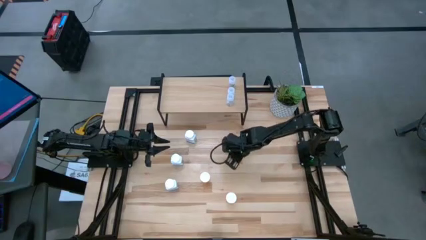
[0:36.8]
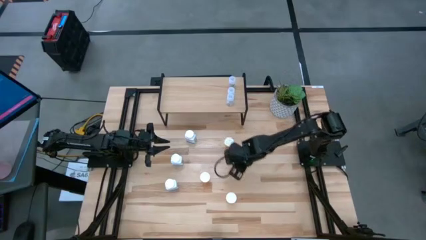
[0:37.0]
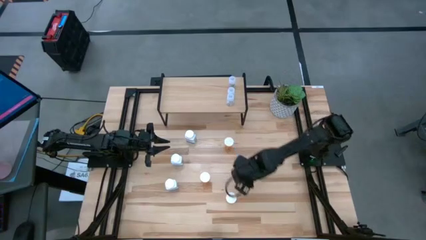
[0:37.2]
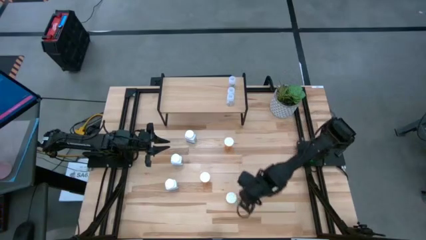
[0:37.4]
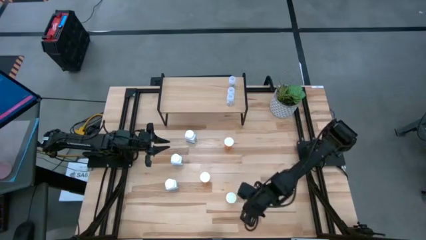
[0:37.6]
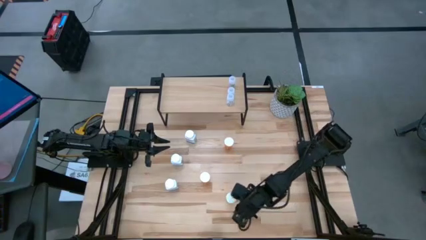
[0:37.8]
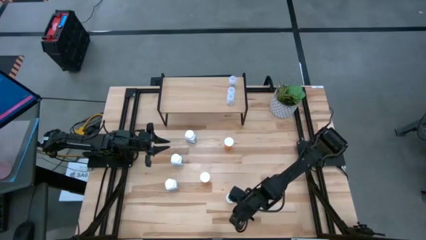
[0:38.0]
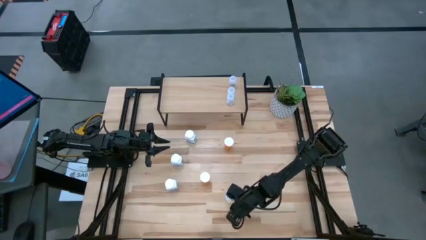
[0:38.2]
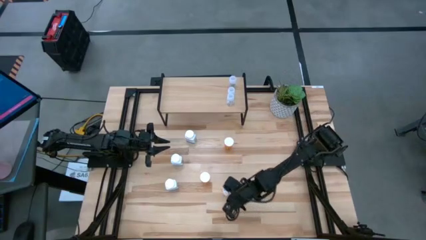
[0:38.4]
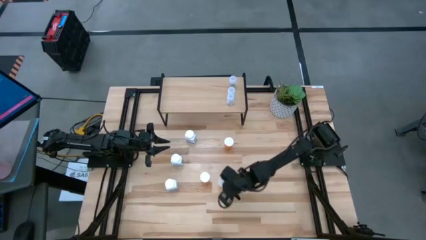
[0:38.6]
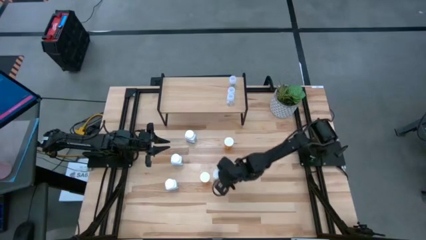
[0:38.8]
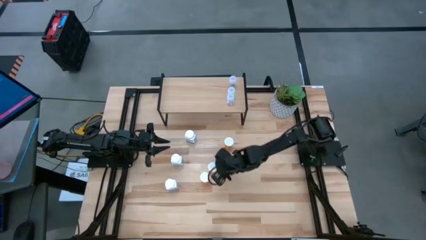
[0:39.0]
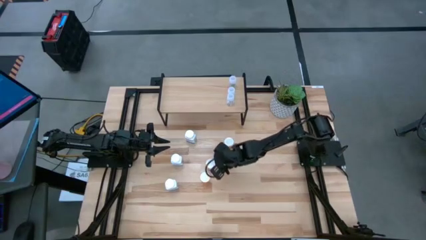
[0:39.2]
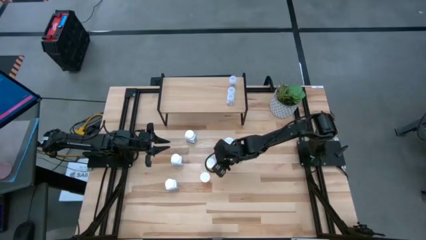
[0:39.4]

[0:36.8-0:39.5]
Task: Pick and place medicine bottles onto shelf by color
Adjust the bottom orange pill bottle

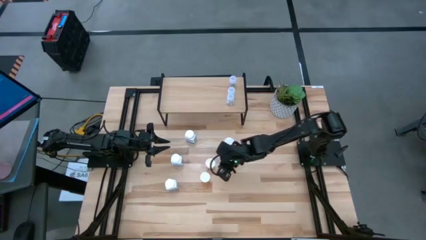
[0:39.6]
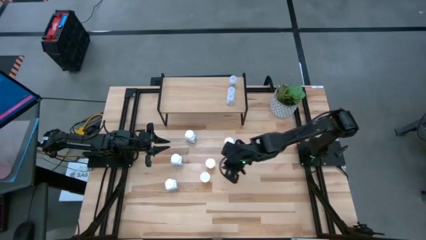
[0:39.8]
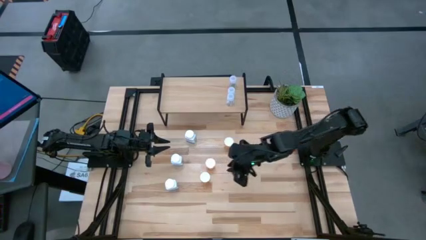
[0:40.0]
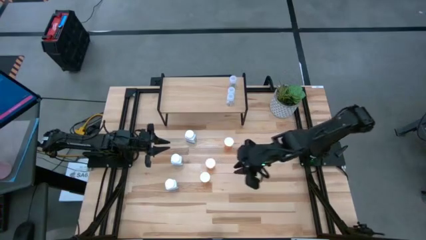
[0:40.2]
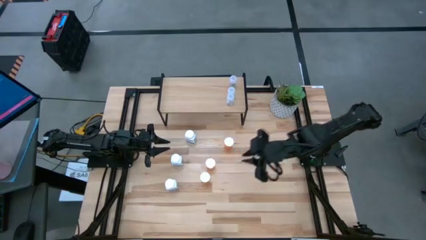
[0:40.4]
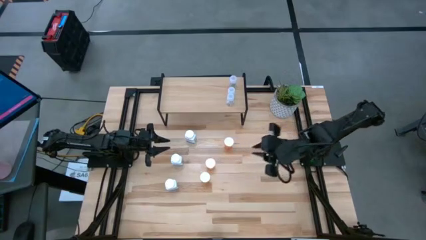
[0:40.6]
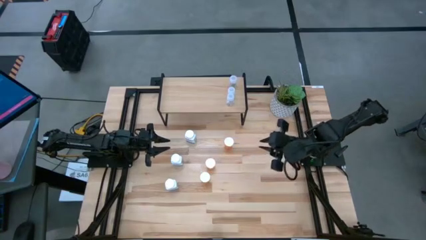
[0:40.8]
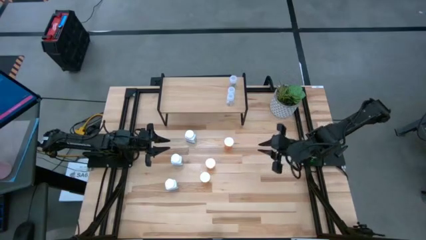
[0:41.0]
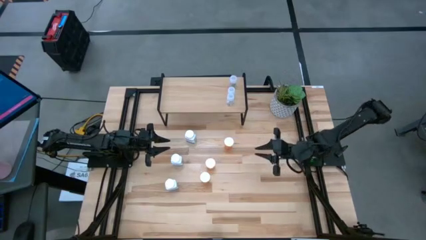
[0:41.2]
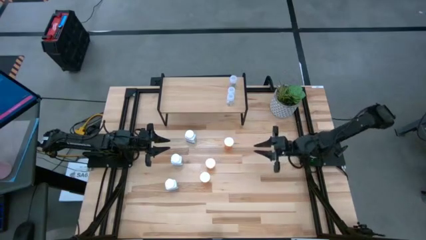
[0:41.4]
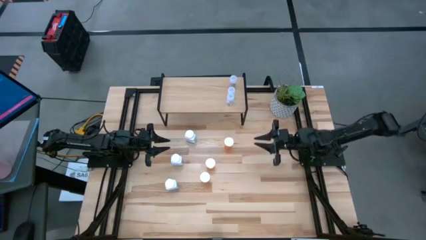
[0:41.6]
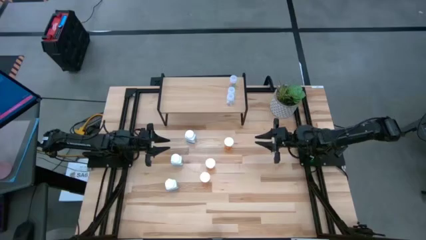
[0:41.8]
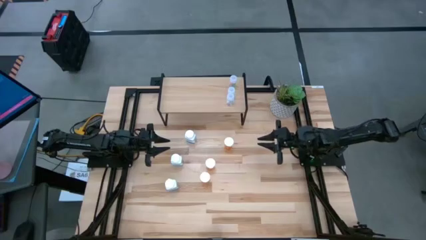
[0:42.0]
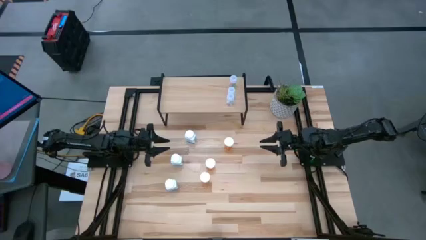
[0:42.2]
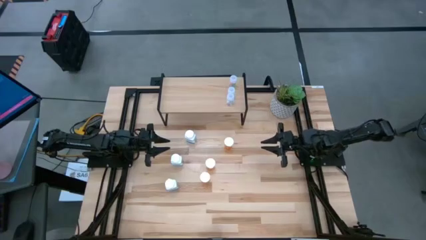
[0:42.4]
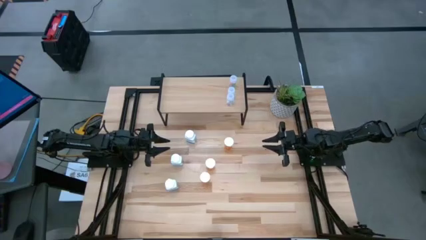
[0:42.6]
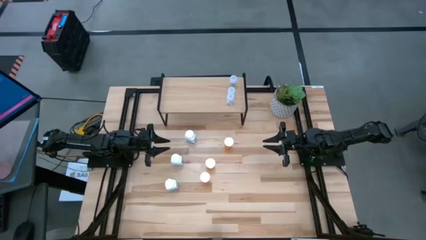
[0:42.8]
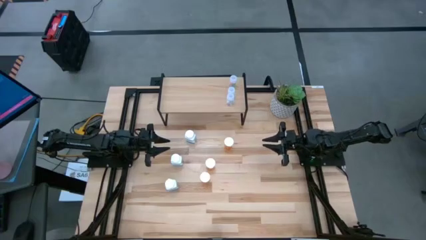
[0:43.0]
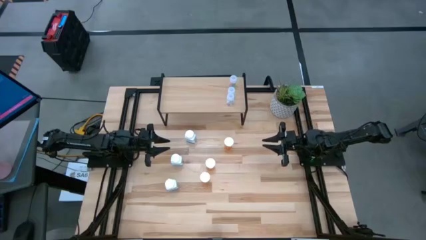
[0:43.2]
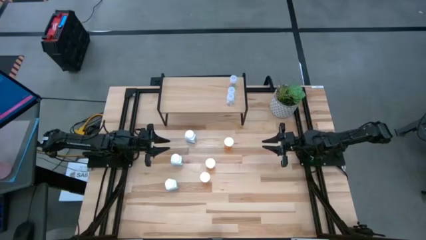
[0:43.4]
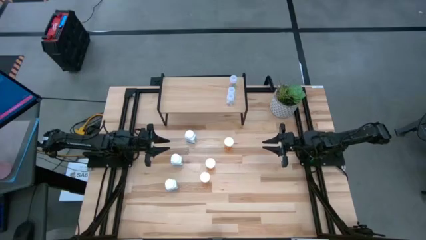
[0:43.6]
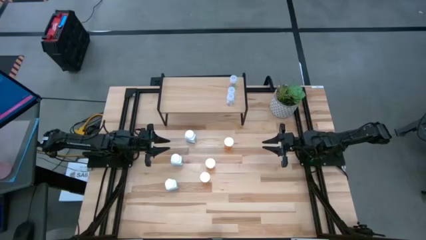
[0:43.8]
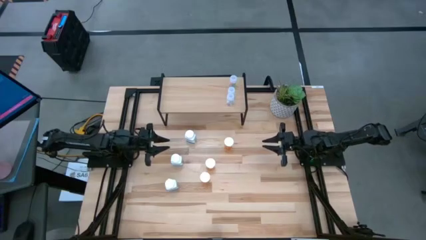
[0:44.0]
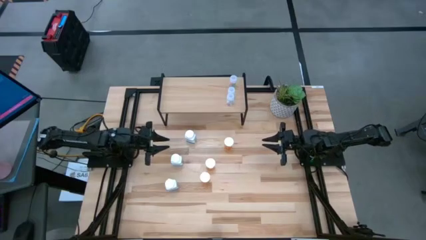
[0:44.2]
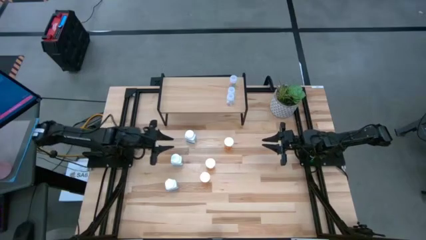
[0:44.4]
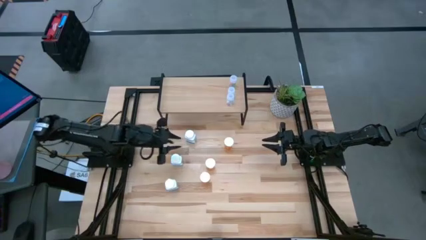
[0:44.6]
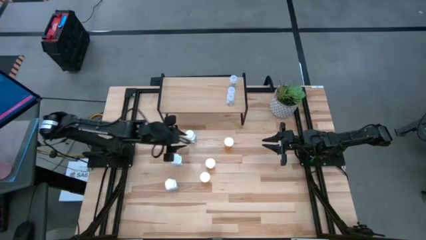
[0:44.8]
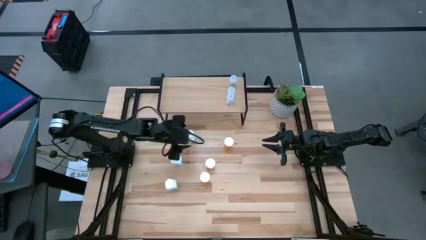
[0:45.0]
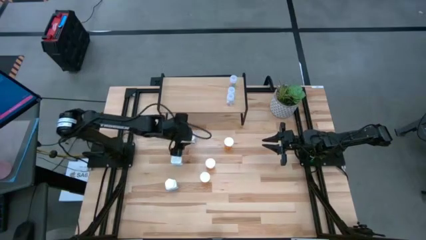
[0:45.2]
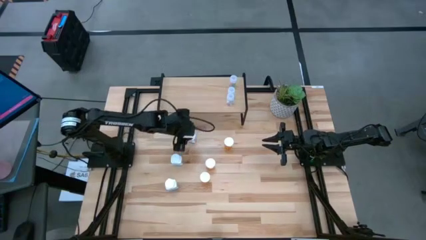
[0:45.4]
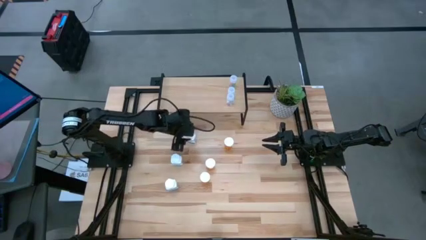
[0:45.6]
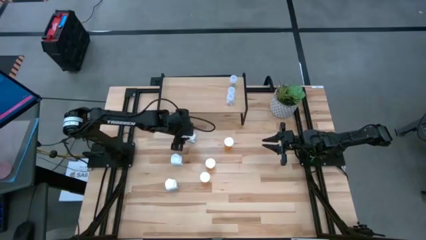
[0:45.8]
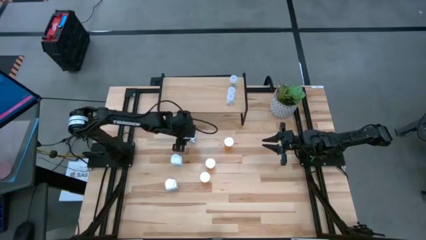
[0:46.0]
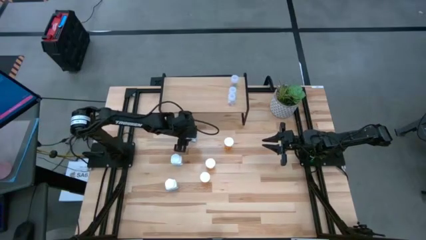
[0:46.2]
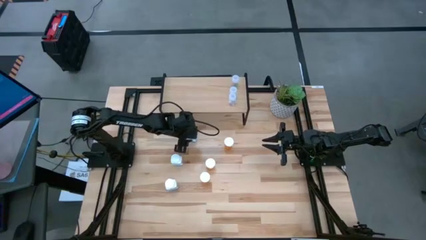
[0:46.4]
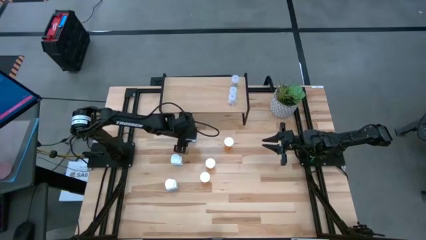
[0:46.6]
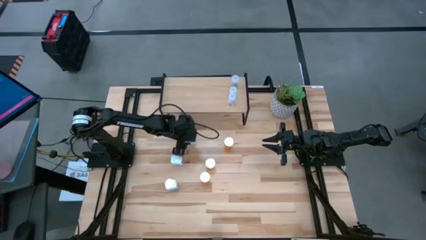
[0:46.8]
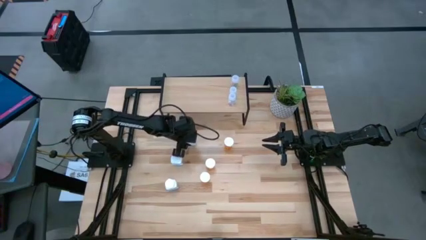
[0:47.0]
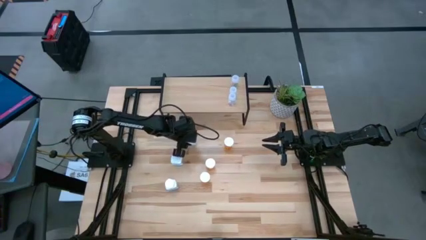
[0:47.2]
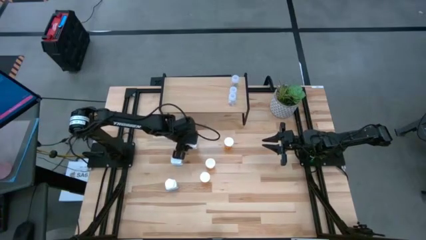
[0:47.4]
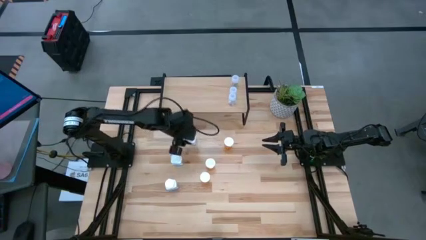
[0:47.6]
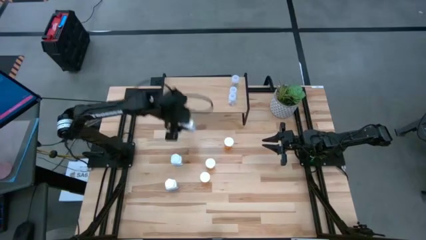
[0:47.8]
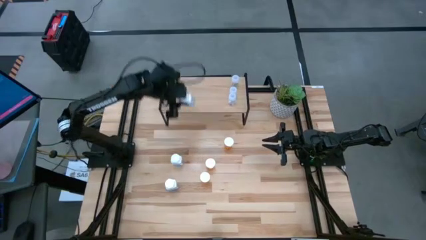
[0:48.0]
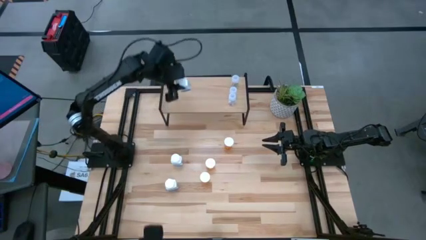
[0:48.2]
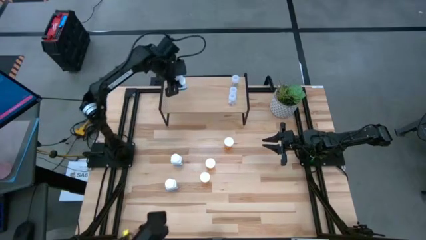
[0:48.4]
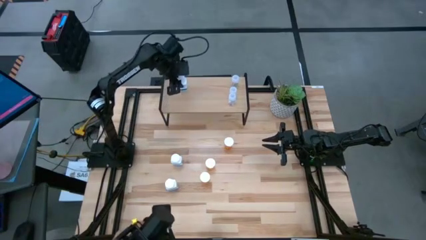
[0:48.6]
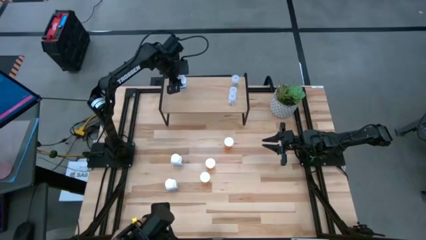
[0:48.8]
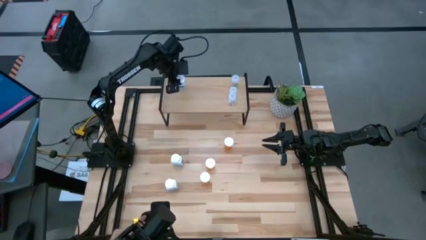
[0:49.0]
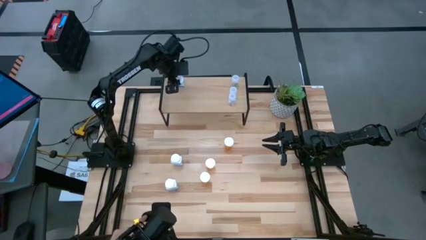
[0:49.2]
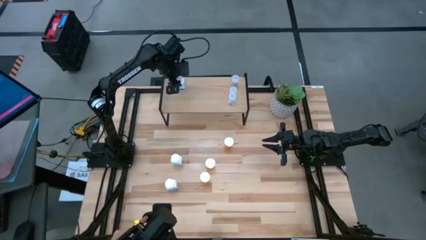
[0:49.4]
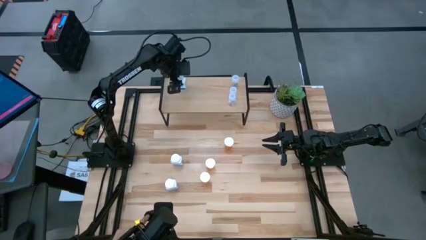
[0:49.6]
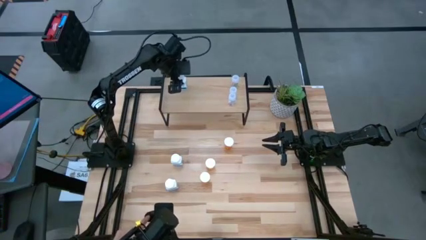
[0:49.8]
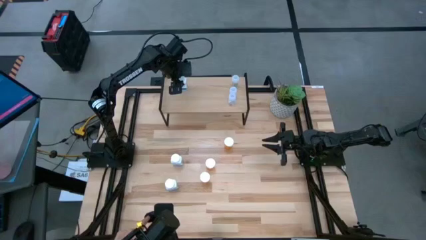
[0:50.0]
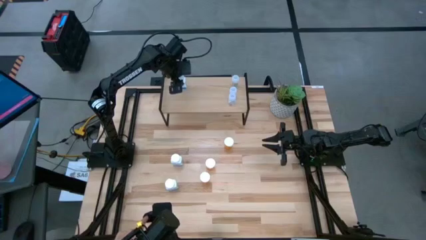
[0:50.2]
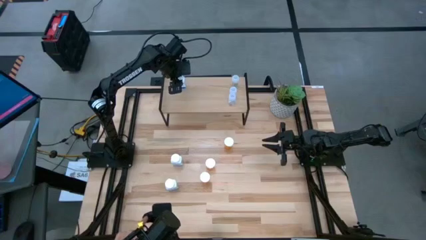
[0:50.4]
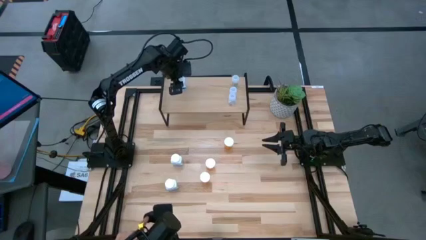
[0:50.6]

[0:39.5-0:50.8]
Put the top white pill bottle on the shelf

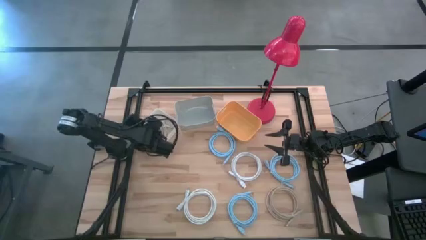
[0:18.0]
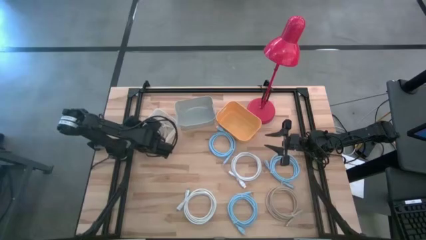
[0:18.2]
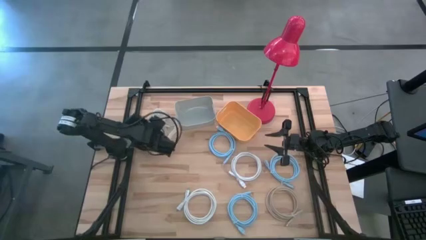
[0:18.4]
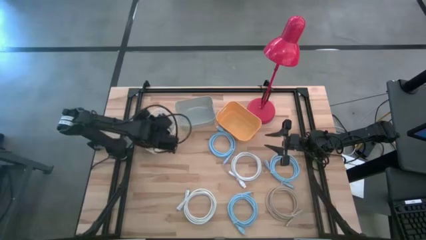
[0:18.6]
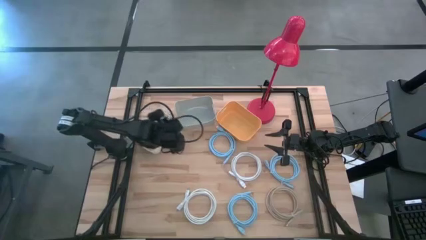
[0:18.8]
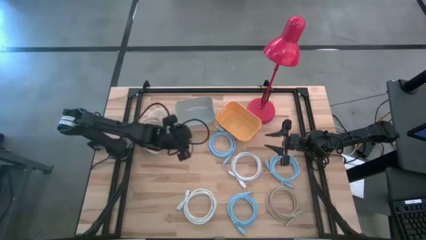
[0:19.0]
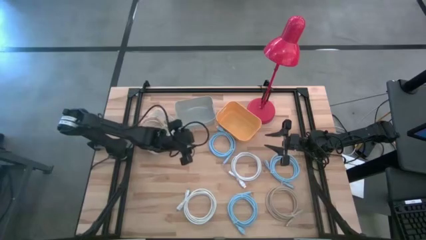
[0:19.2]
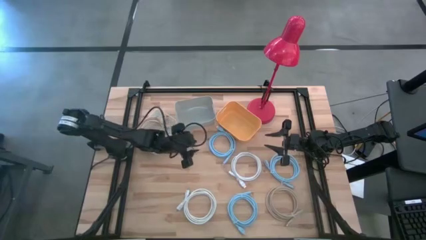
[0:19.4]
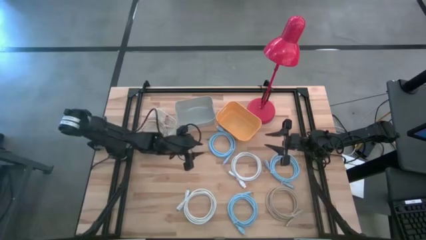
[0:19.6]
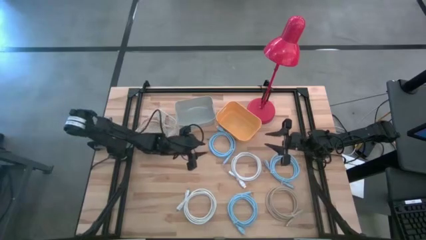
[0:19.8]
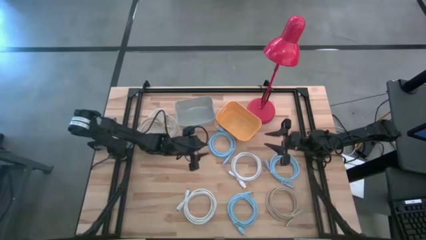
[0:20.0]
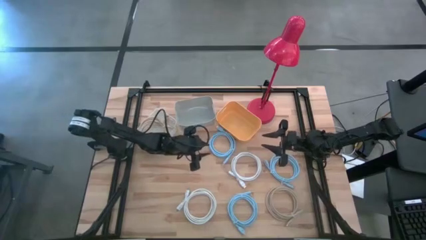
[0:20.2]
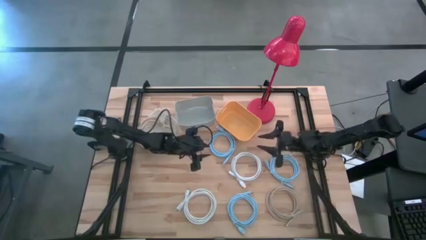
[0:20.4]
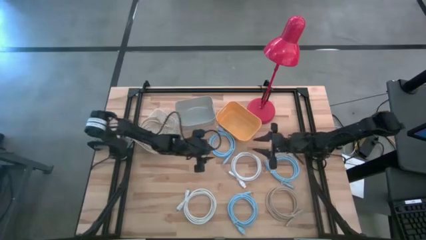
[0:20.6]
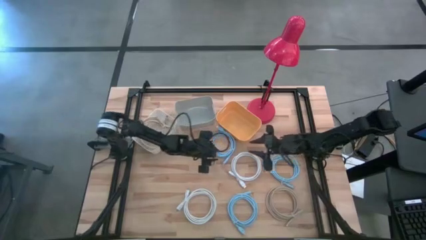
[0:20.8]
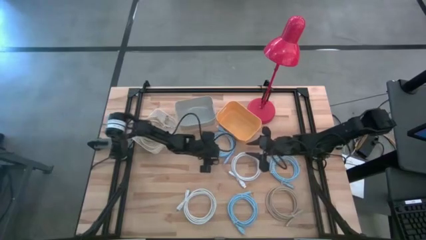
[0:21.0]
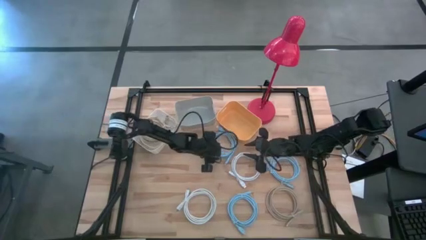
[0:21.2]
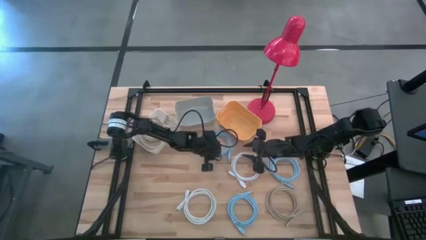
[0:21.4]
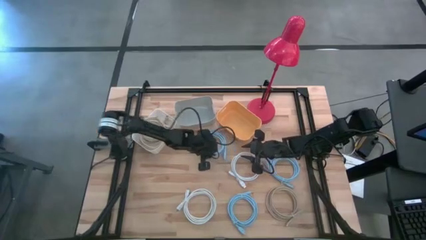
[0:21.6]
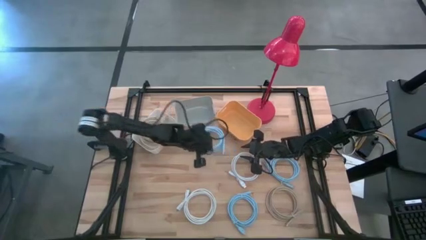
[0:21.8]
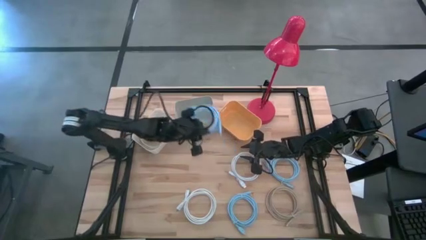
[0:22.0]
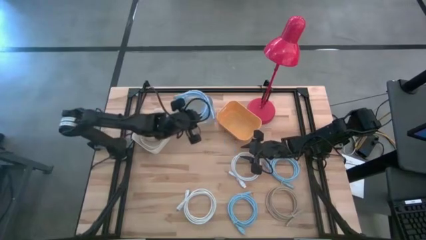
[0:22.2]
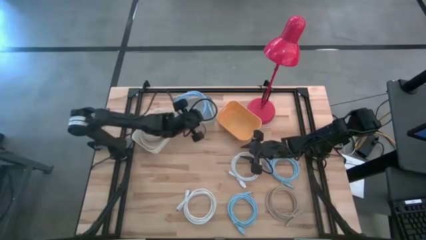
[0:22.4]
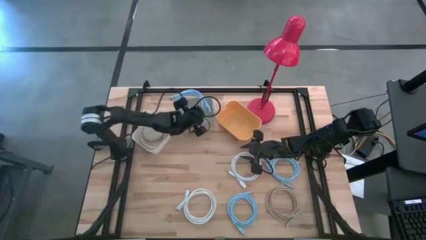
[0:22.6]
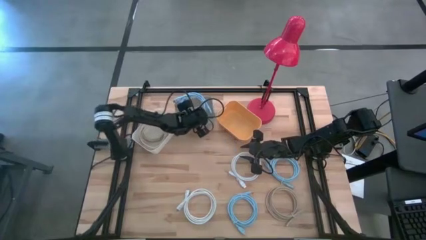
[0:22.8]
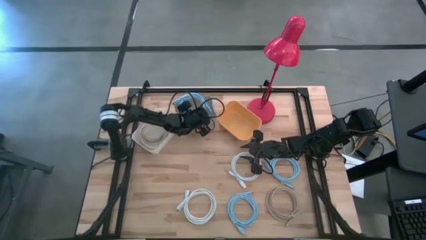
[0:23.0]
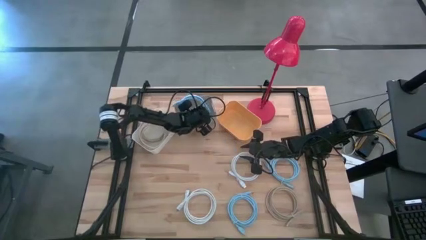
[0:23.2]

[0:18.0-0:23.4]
Task: Sort HDMI cables
Put the top left light blue hdmi cable into the gray bin
